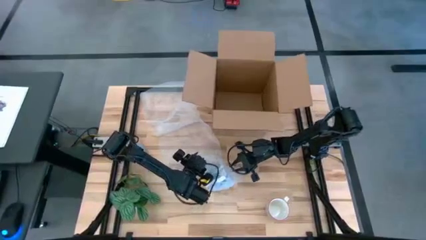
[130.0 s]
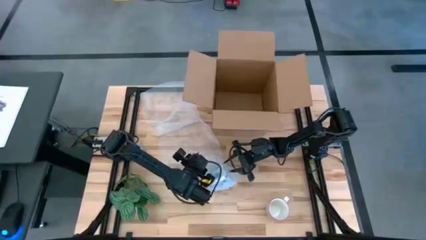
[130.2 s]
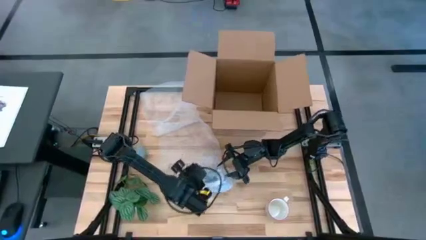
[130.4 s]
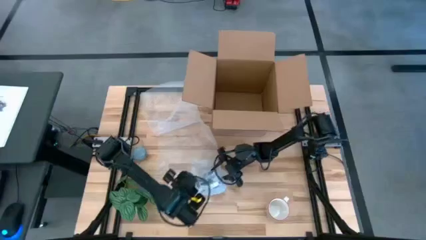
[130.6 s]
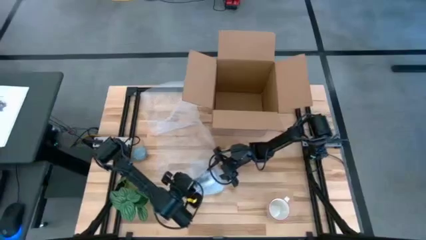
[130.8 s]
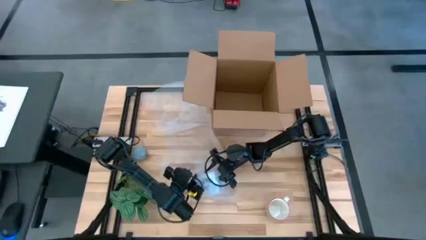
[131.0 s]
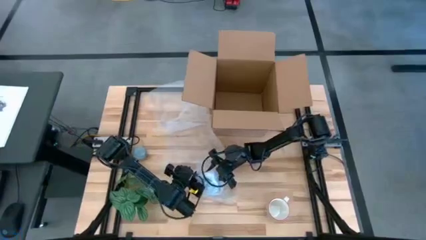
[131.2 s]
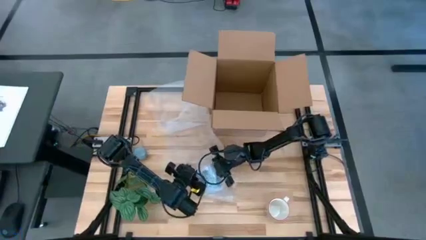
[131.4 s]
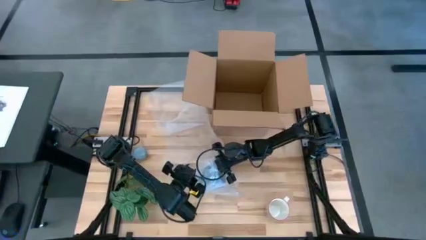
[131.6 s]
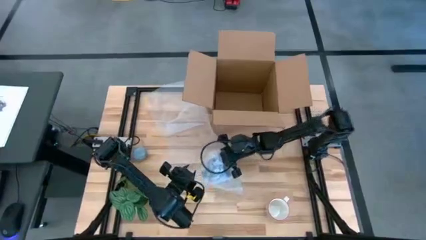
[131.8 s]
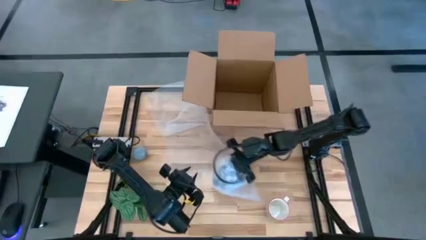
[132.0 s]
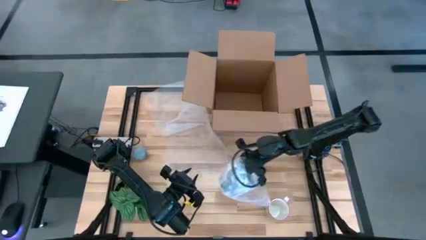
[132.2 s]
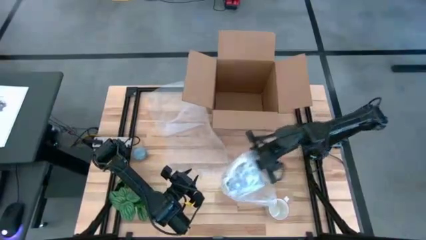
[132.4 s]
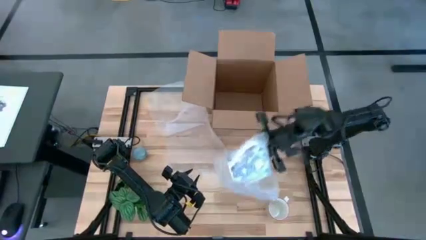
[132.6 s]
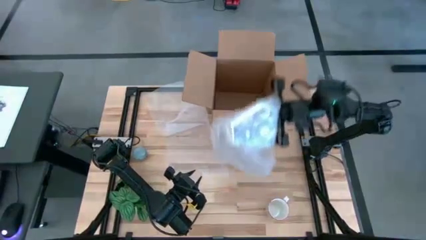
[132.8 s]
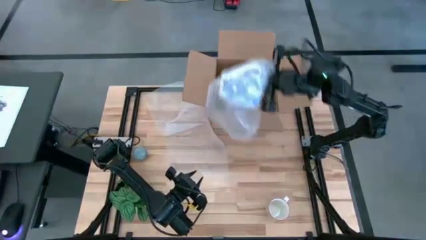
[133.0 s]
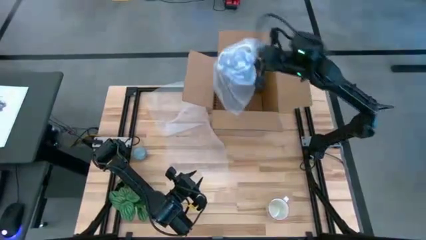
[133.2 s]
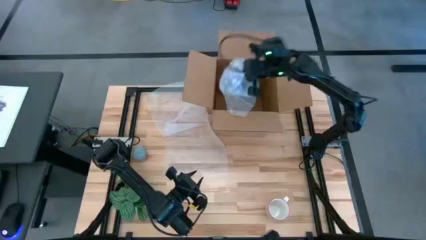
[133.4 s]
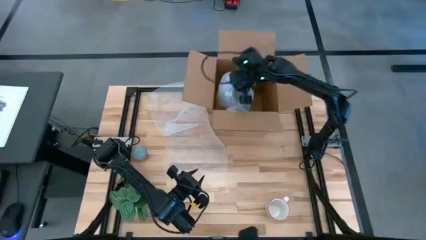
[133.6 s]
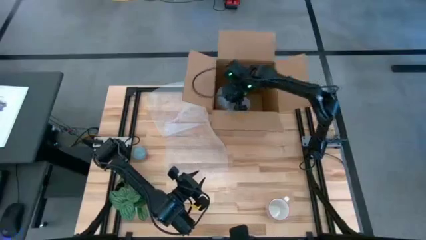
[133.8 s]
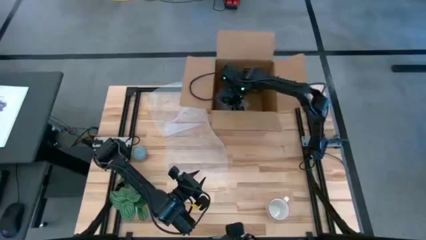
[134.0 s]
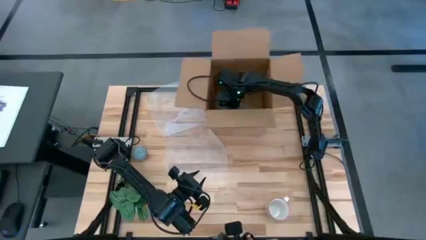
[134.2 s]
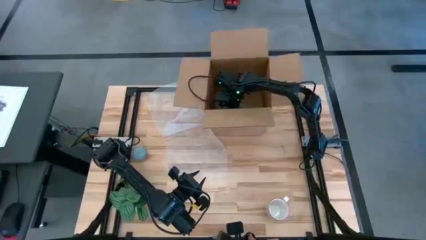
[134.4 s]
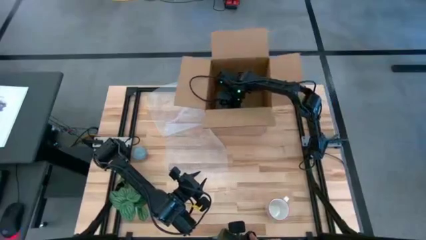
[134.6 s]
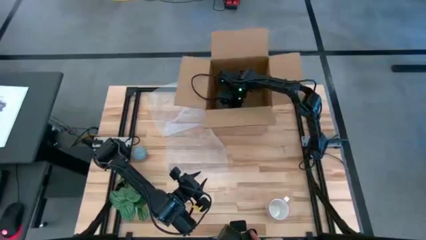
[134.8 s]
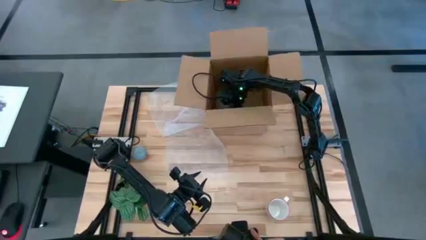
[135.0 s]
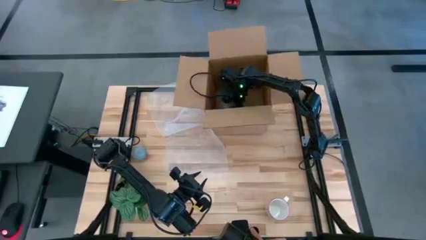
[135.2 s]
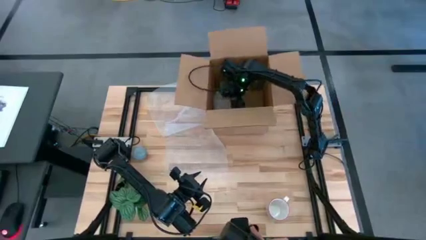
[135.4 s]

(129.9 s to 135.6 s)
Task: wrap mug
Put the white blue wrapped mug into the cardboard box

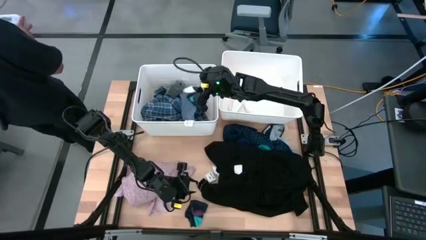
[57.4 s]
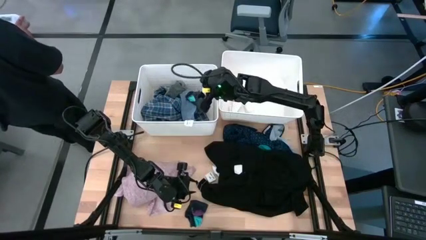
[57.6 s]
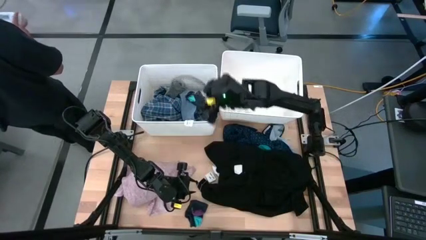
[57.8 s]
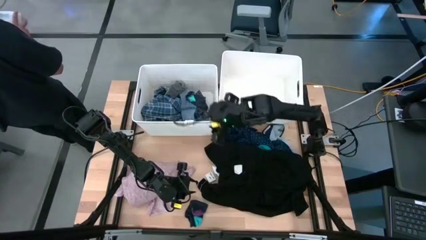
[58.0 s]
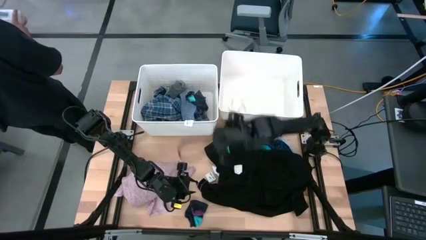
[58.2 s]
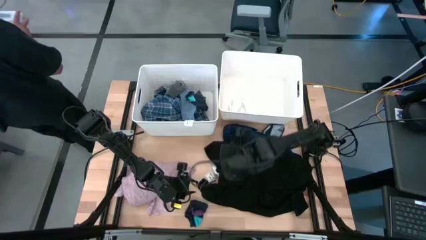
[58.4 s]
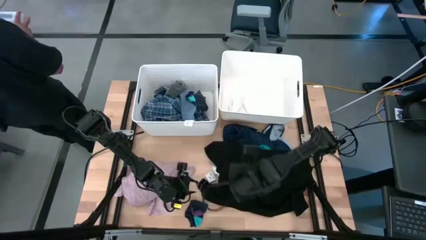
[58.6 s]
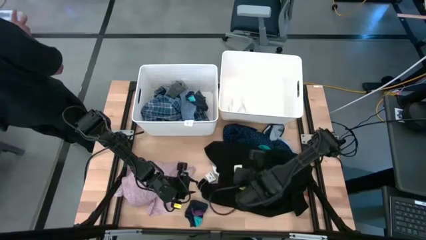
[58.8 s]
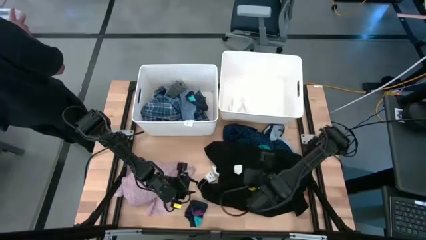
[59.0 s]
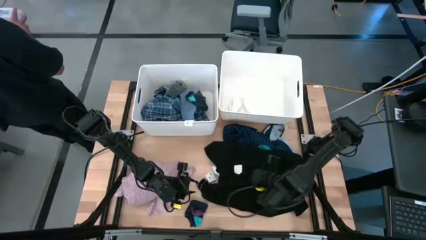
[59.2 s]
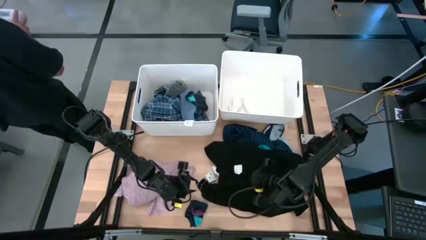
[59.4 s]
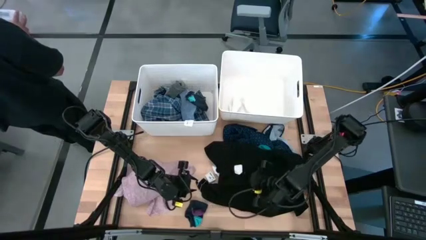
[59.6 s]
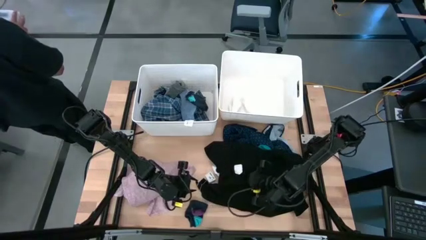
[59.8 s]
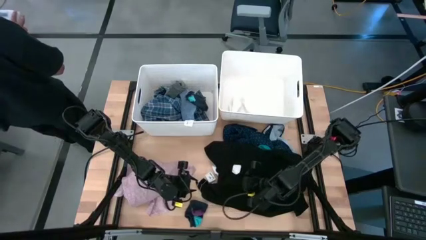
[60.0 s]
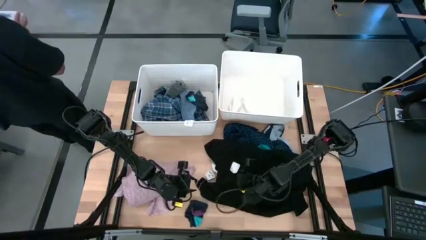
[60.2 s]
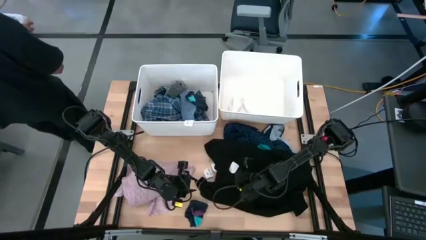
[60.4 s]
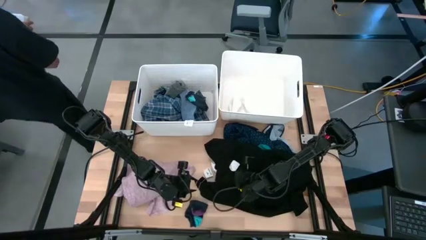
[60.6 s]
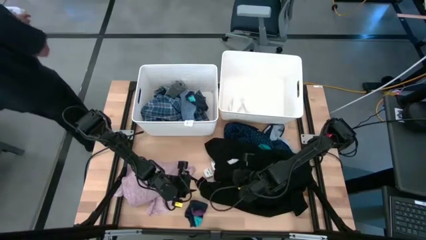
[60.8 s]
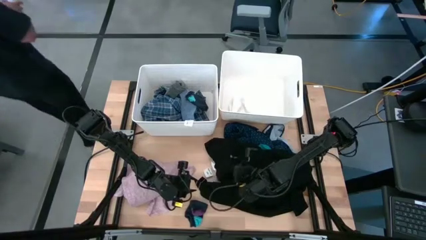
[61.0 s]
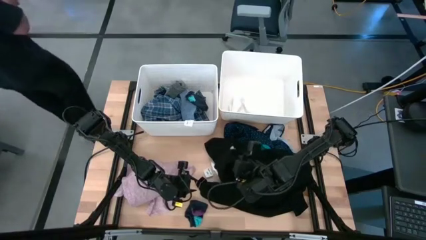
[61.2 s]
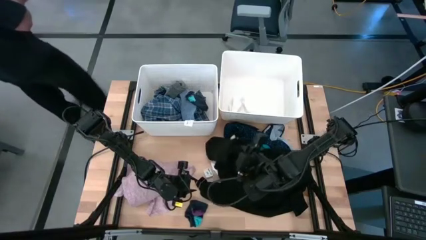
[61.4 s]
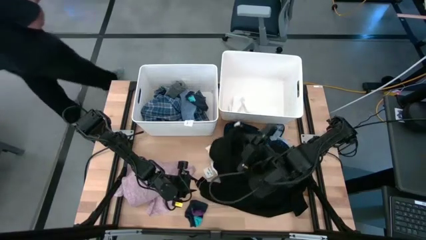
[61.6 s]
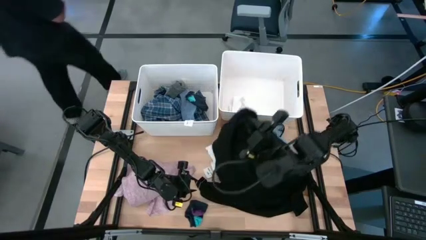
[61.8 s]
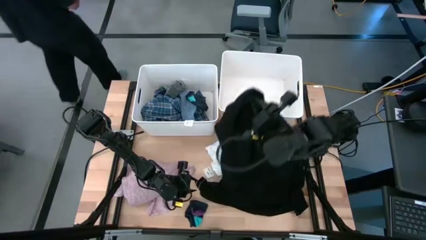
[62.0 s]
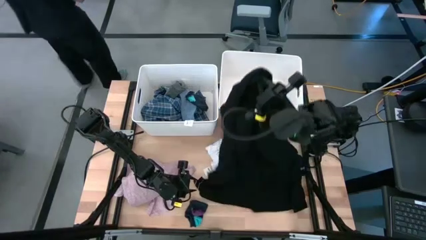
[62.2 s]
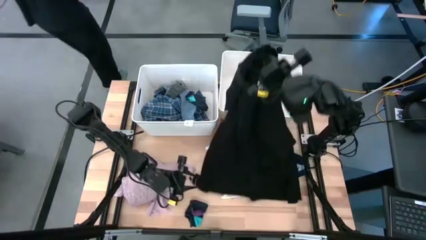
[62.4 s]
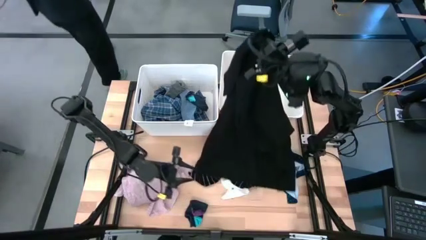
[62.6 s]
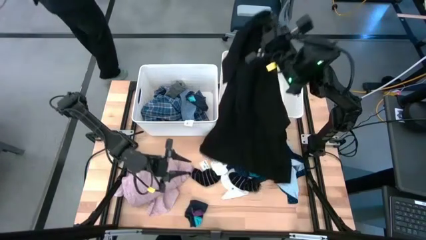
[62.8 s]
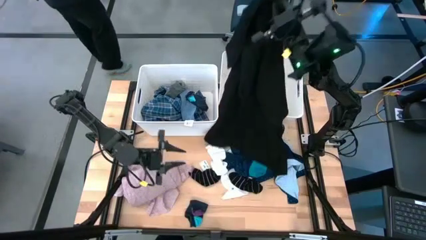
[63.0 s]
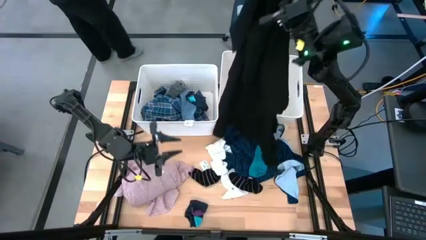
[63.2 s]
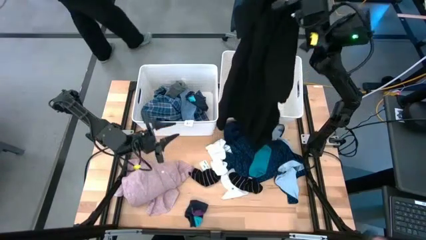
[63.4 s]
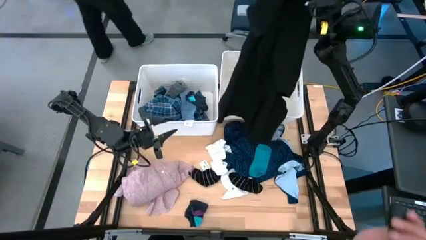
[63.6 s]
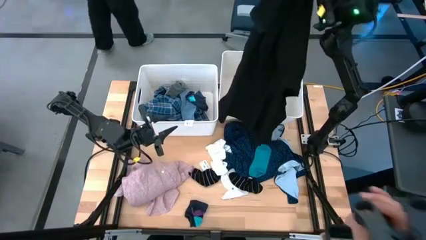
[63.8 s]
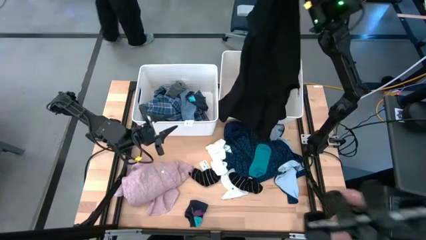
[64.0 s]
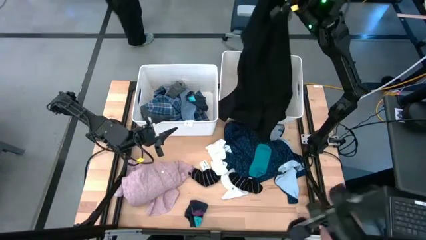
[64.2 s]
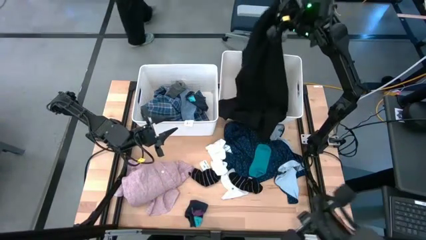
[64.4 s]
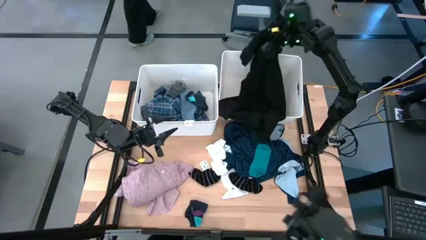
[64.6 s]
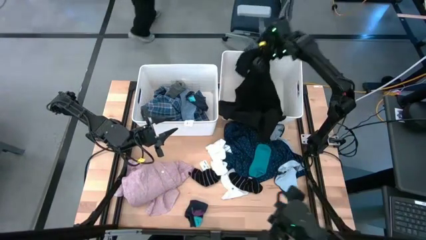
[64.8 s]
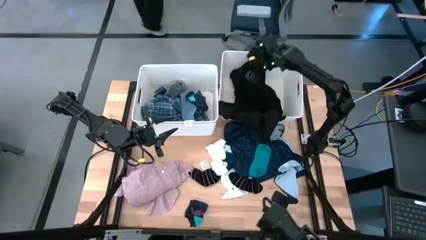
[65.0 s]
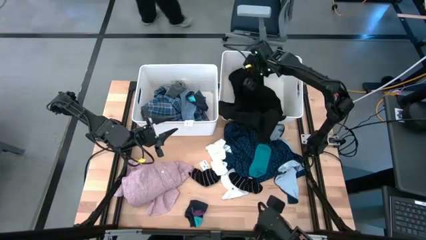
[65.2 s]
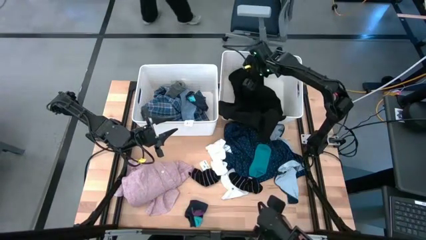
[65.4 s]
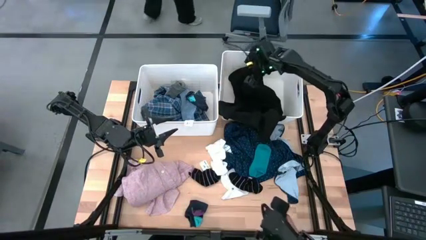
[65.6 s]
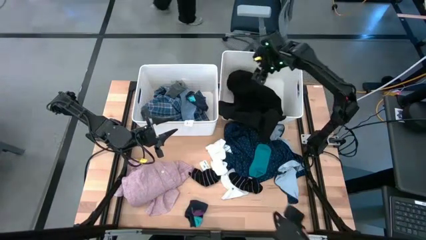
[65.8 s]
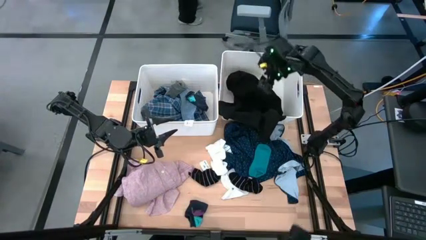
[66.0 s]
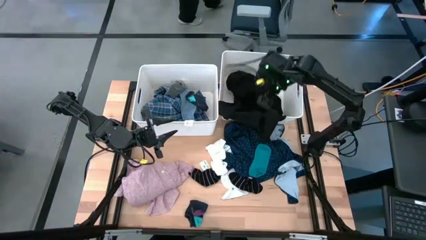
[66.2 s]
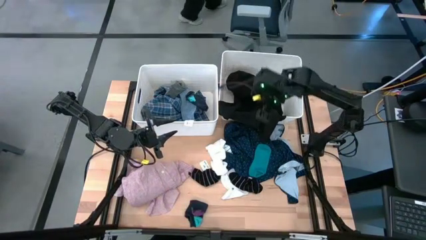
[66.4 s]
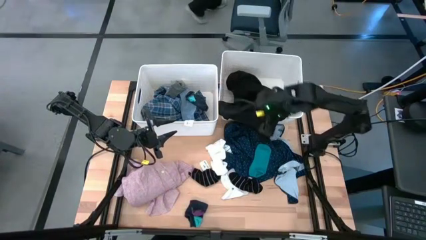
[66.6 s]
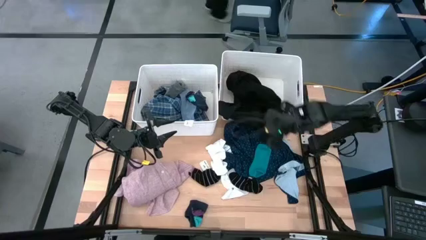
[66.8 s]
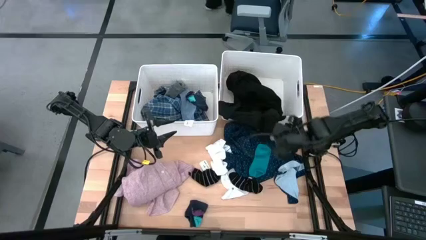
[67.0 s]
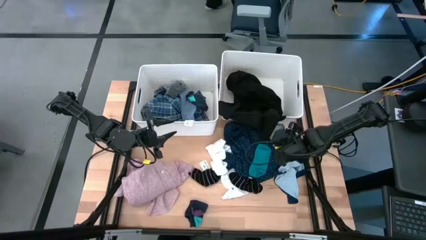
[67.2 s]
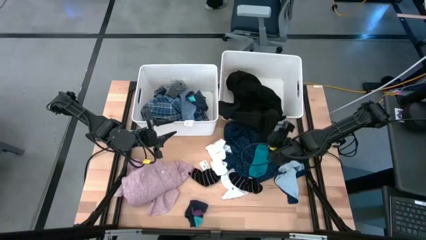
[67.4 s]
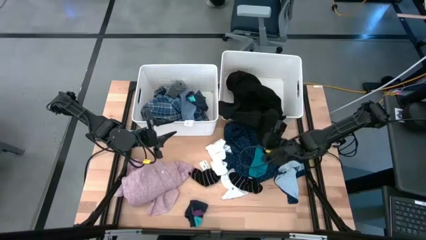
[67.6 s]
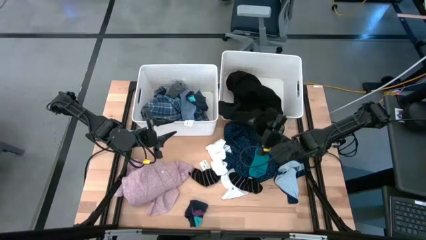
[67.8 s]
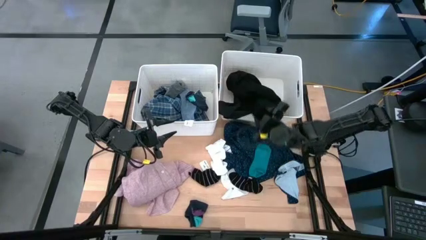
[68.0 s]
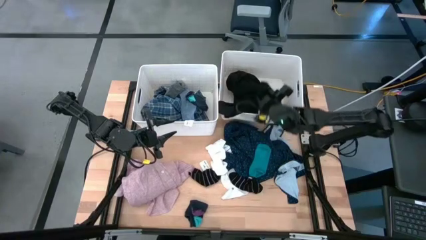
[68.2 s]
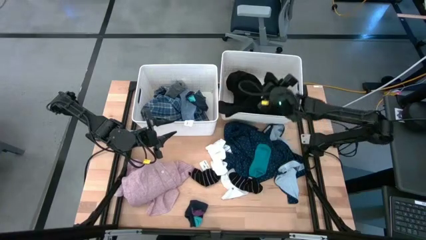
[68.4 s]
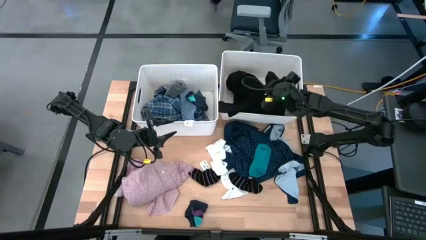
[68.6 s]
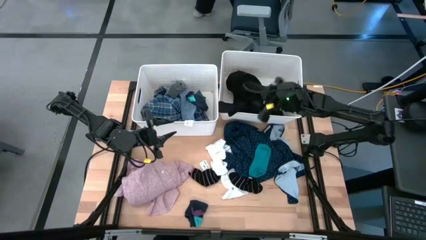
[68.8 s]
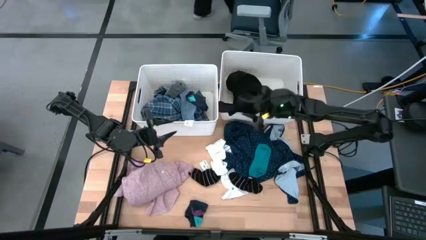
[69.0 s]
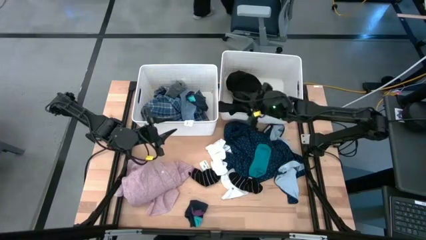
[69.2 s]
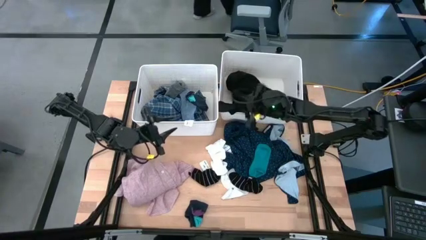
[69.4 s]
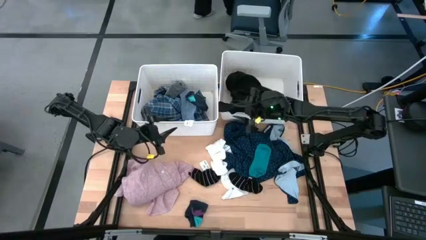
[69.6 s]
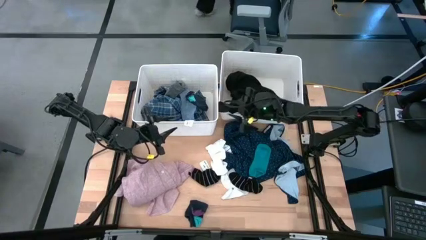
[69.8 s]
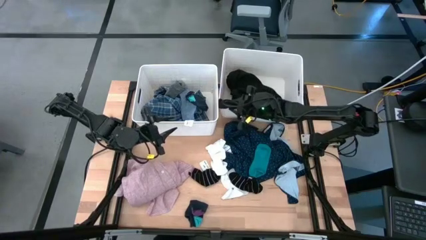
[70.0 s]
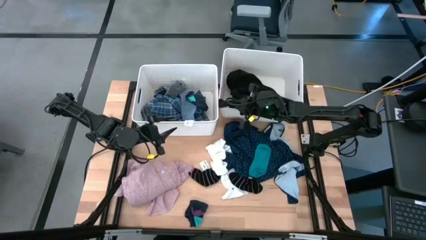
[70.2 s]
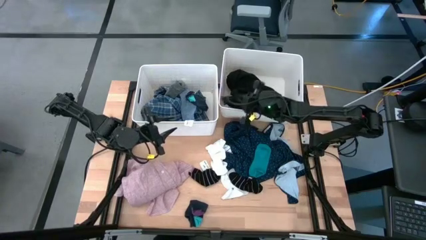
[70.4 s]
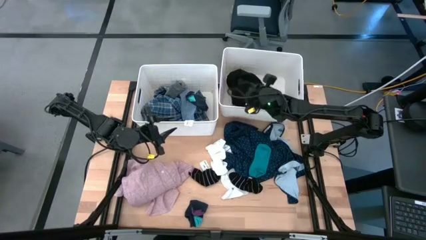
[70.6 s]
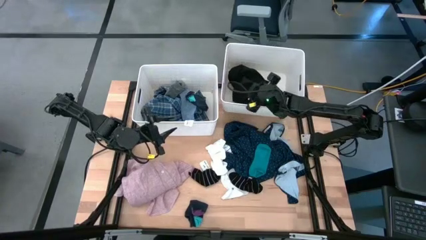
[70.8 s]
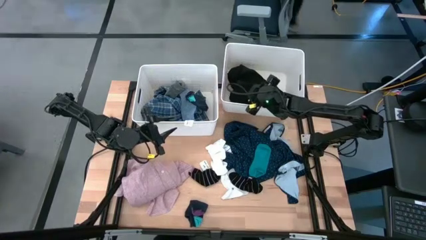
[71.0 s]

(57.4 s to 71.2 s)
Task: Sort clothes
Put the black coat into the right white bin
